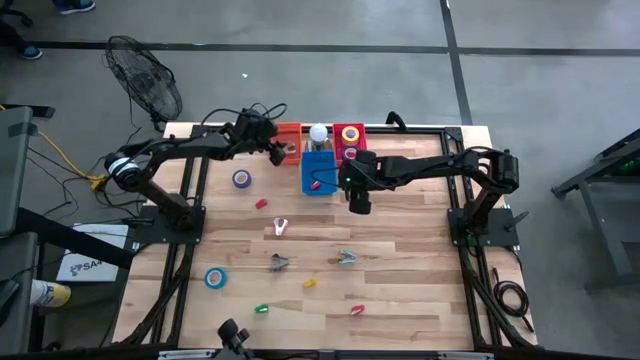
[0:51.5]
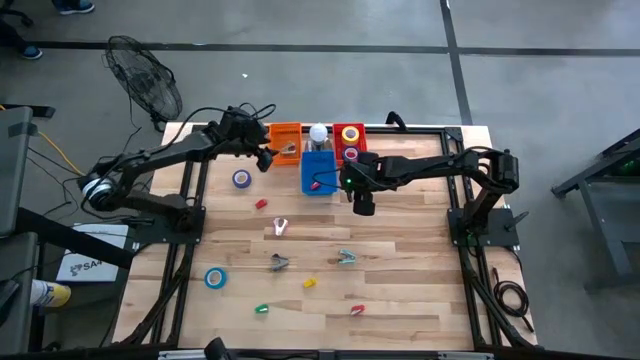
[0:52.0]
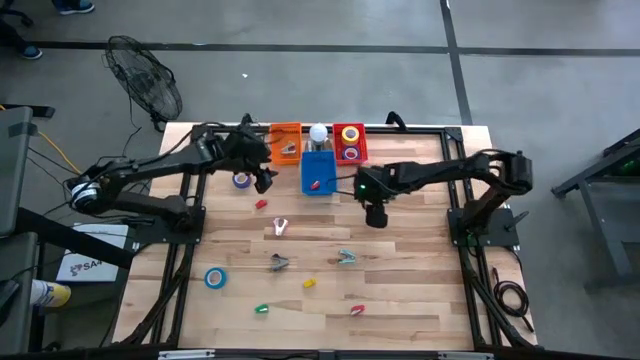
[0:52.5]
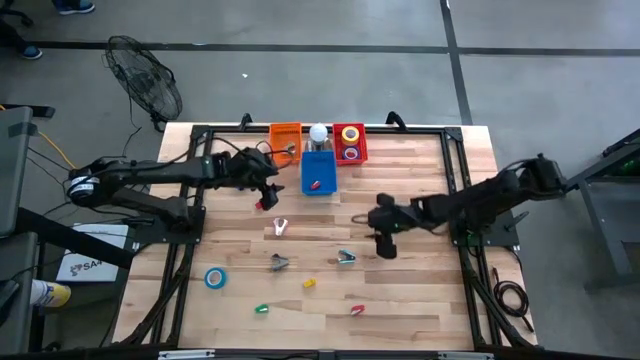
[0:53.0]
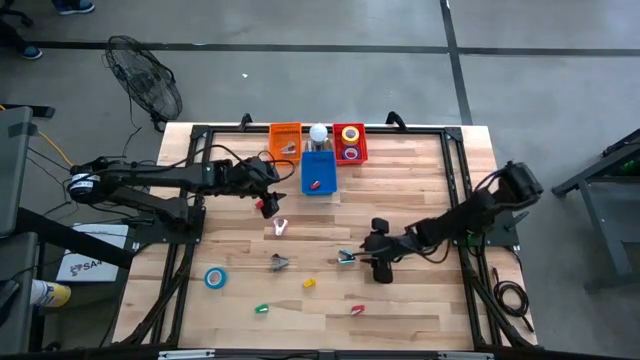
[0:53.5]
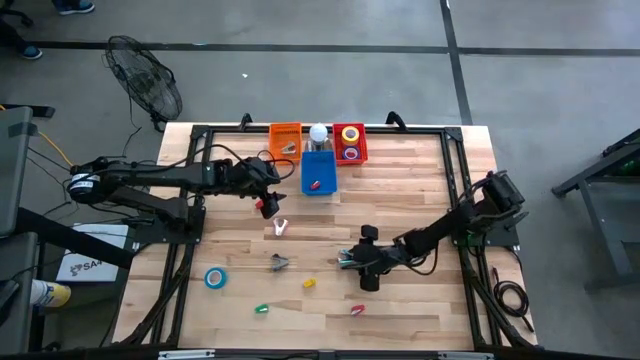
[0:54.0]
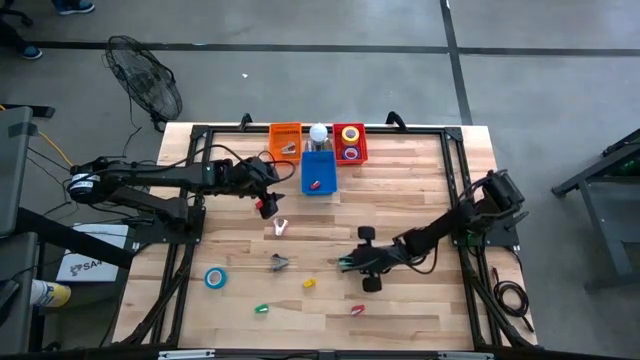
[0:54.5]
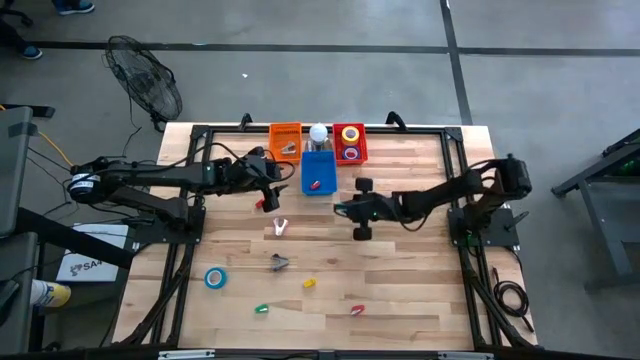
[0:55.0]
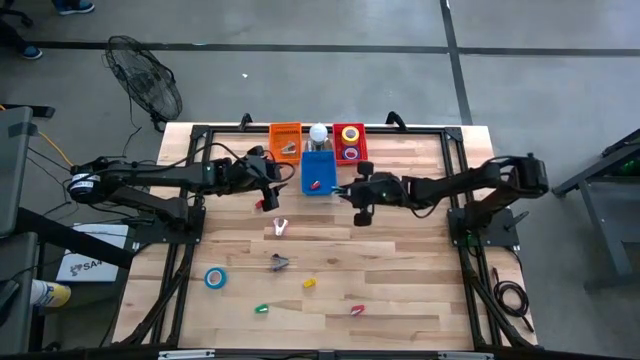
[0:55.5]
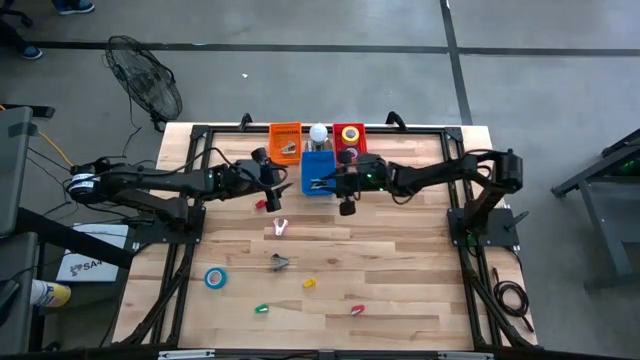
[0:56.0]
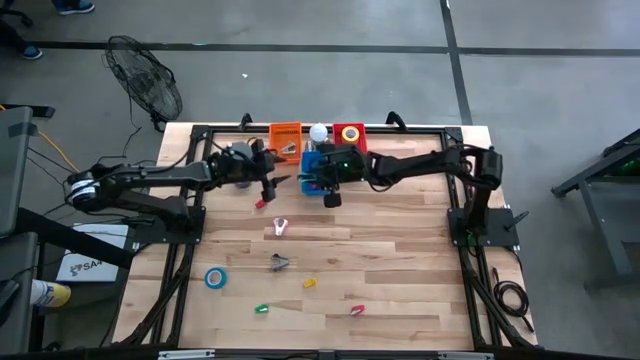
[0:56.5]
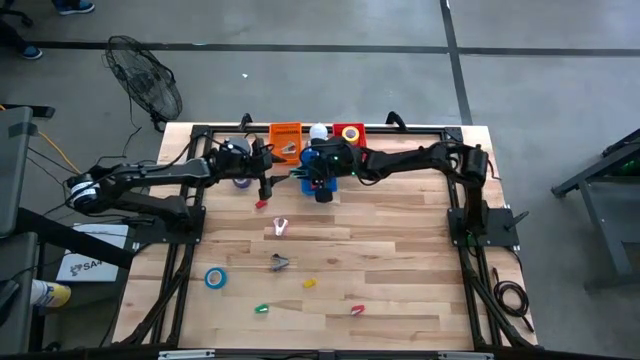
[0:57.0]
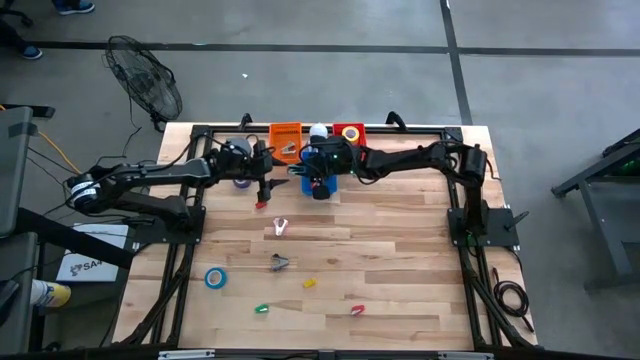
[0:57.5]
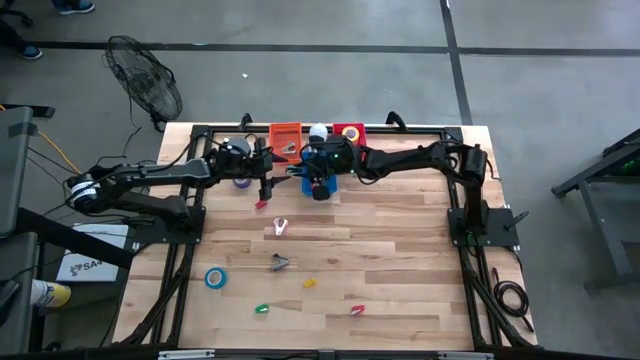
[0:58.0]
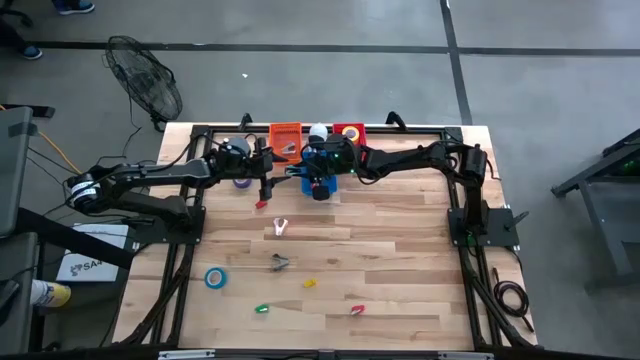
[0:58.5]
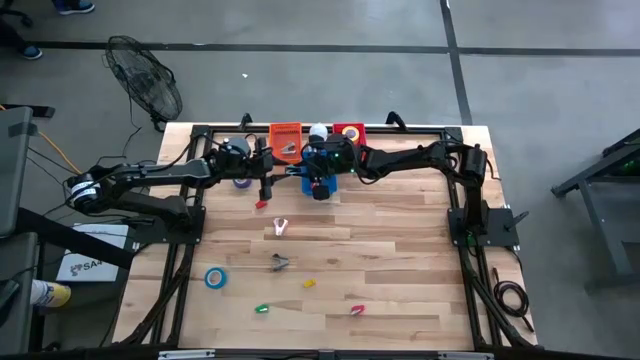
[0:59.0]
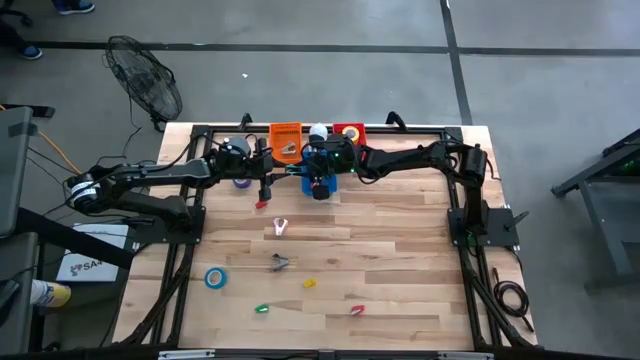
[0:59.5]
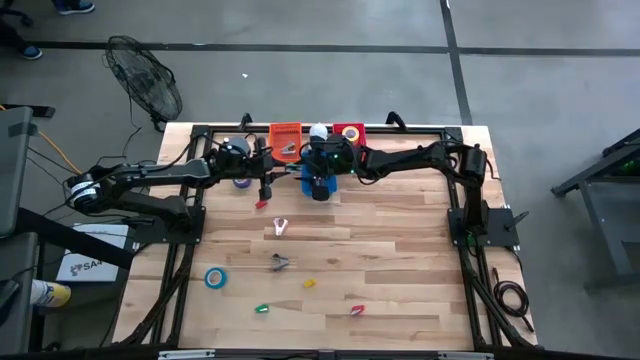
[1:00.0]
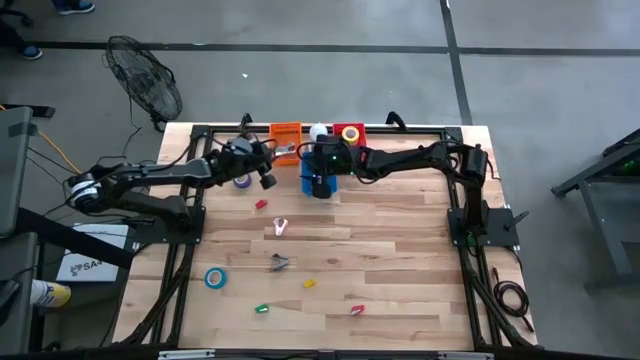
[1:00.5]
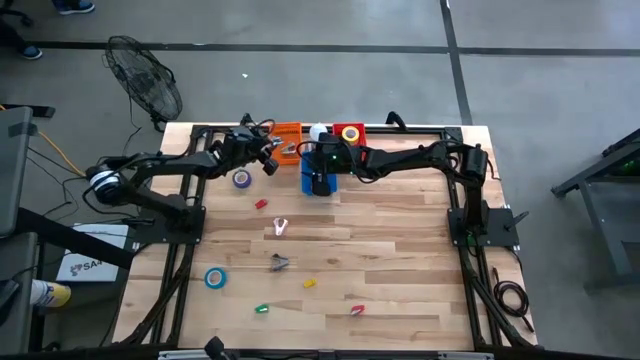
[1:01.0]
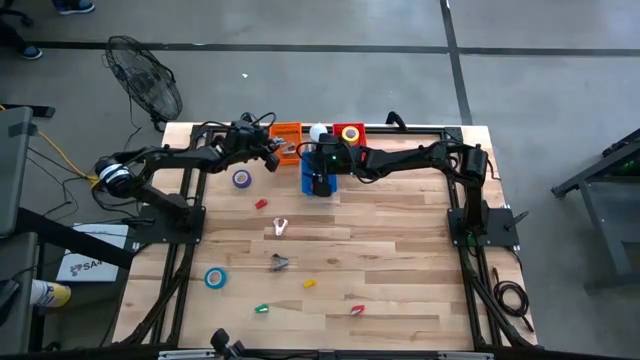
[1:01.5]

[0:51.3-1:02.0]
Task: Pick and place Stapler, Stapler remover, tape
Put the light blue staple remover into the orange basket

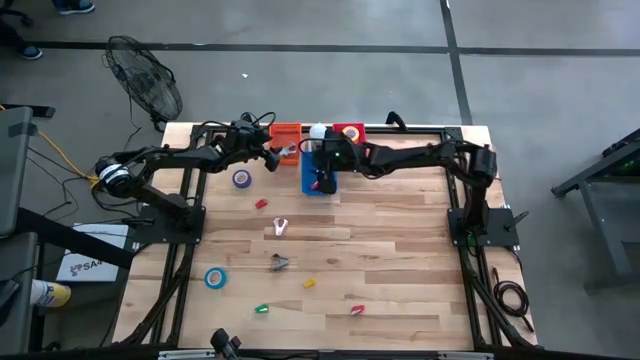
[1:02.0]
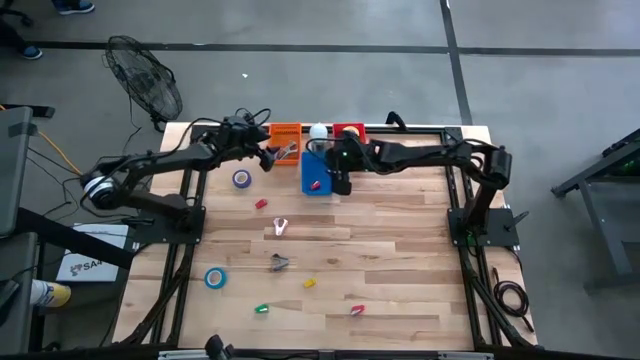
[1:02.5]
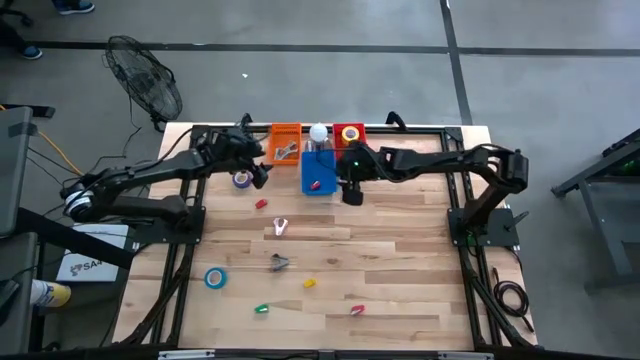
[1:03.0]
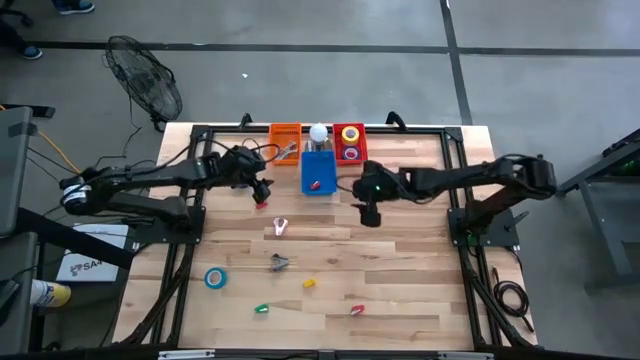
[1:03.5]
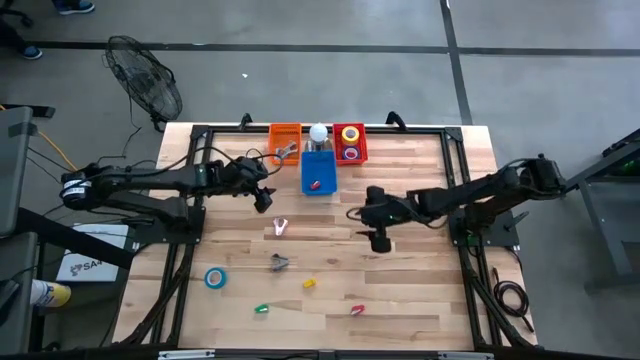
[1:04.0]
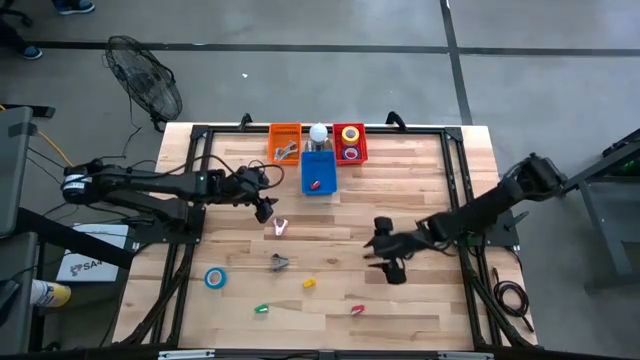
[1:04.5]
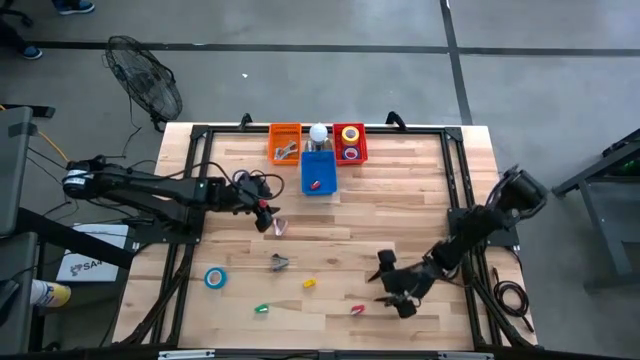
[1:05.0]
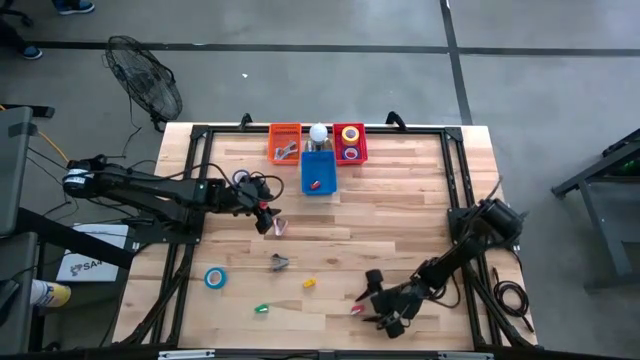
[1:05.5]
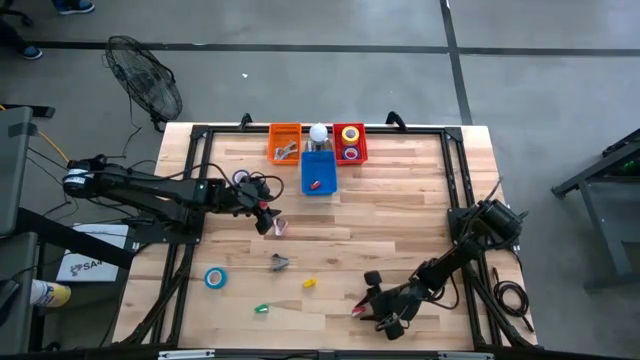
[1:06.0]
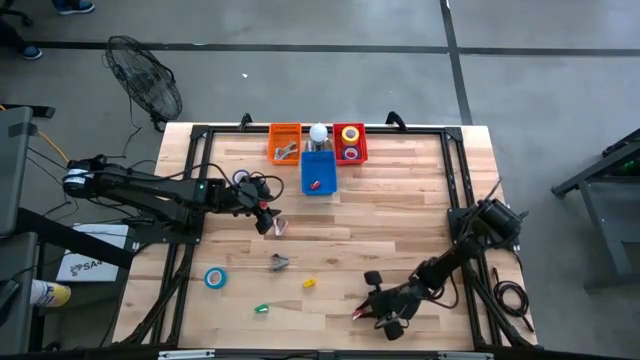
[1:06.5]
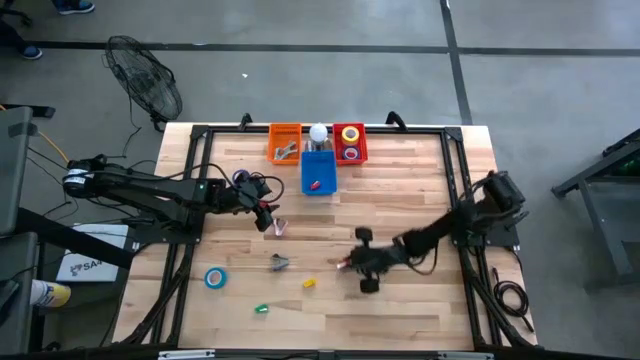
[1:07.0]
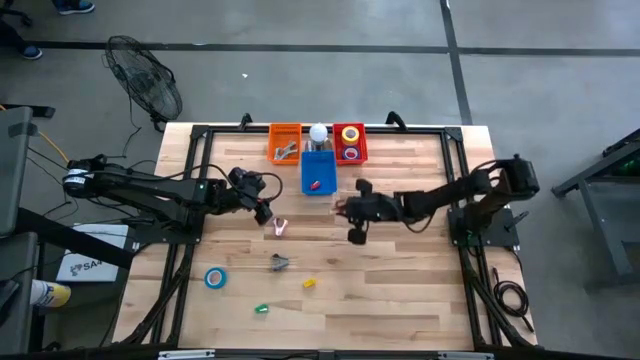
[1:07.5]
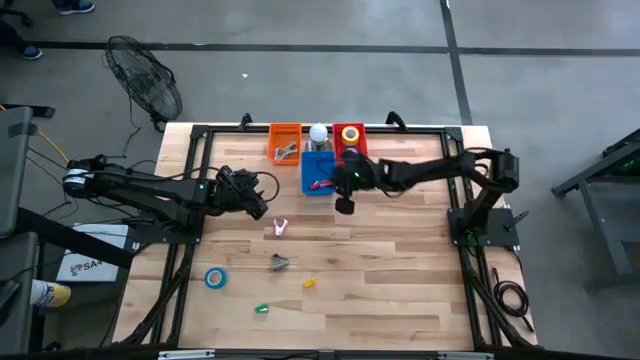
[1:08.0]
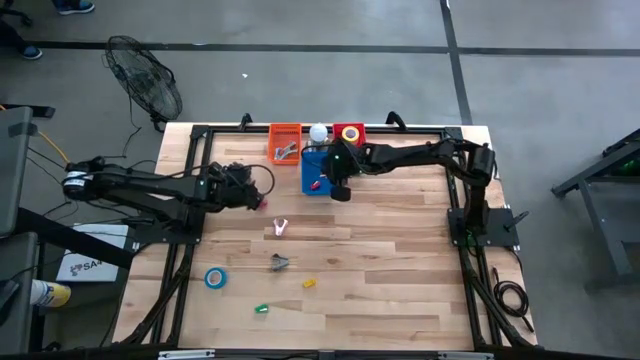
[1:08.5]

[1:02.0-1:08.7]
Put the bottom red stapler into the blue basket

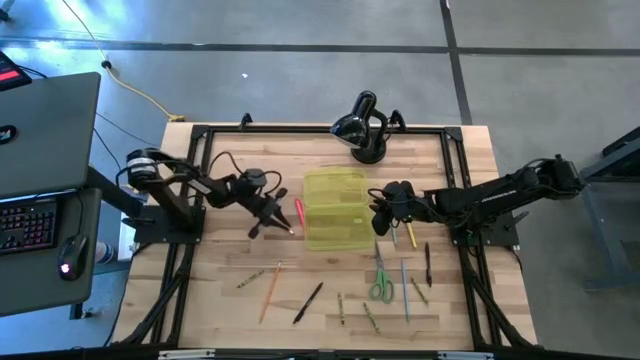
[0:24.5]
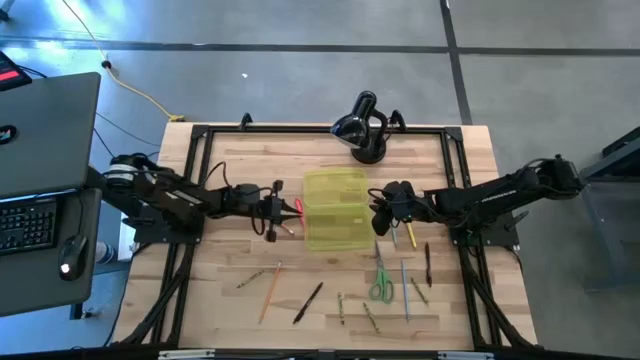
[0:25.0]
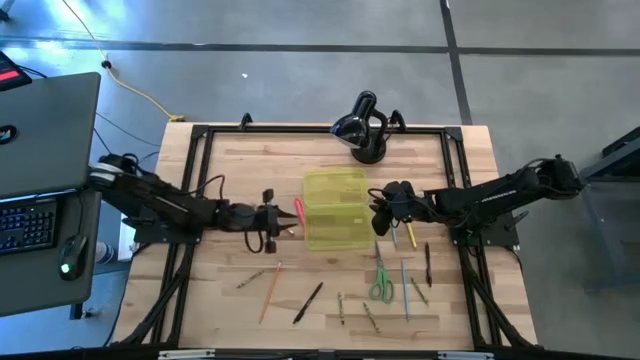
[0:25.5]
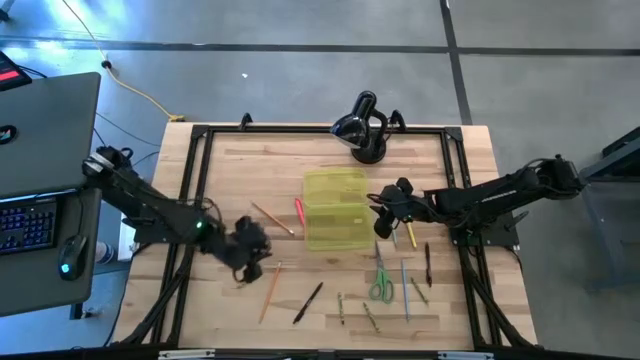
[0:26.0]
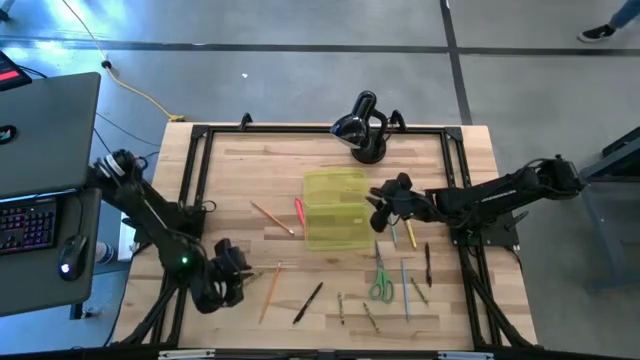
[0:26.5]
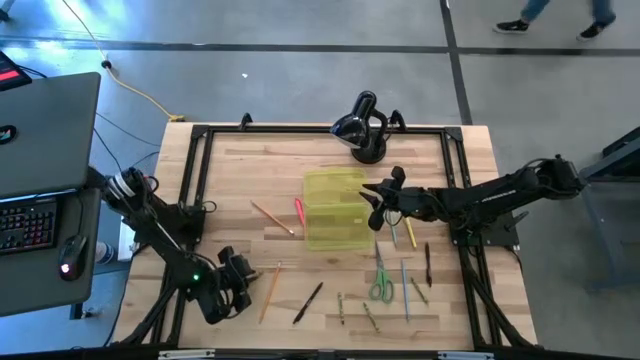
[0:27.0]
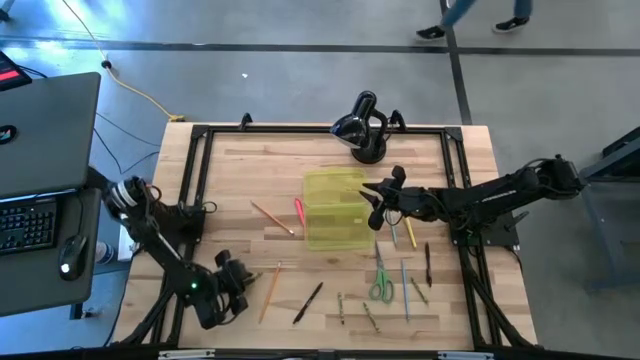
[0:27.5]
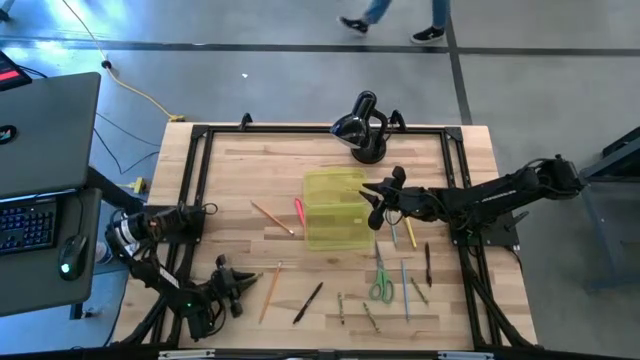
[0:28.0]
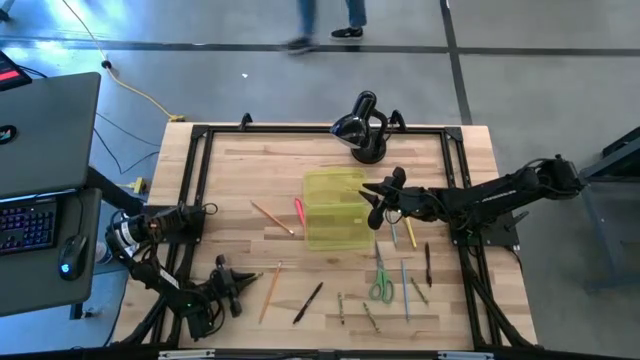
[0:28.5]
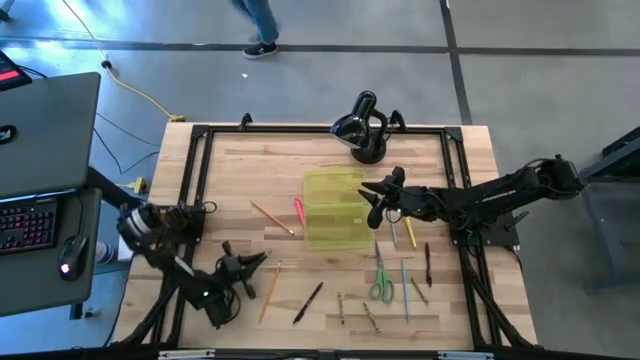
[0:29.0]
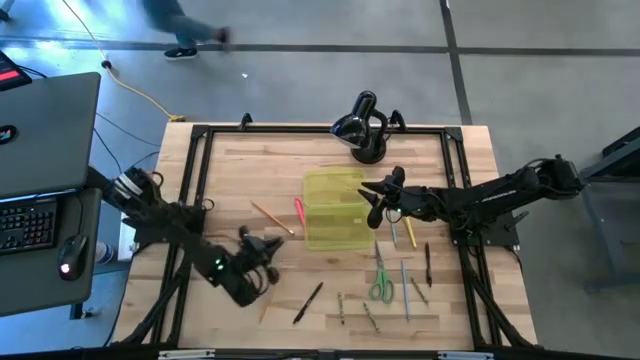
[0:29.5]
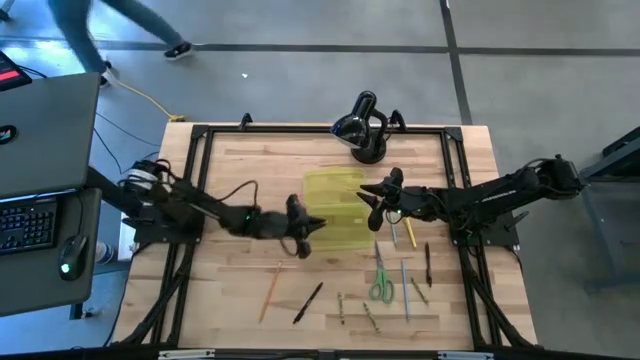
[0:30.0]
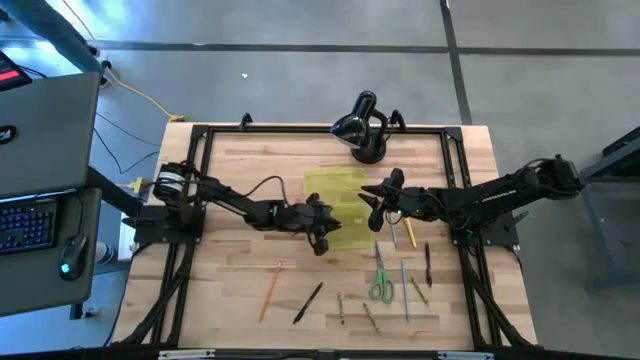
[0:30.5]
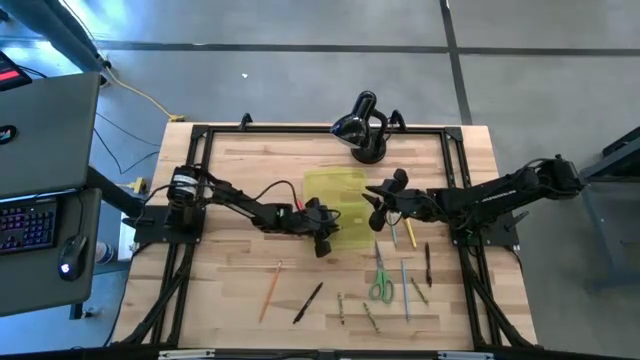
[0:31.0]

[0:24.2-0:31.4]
Task: Pick & place school supplies into a supply box
Put the green crayon into the yellow pencil case
